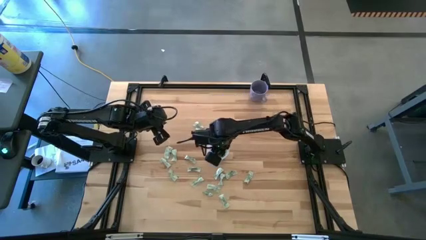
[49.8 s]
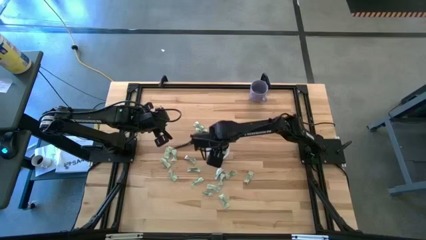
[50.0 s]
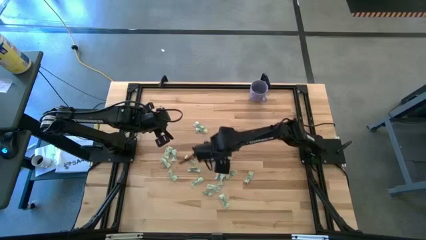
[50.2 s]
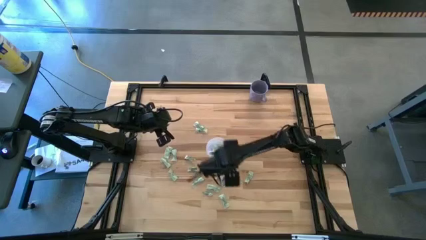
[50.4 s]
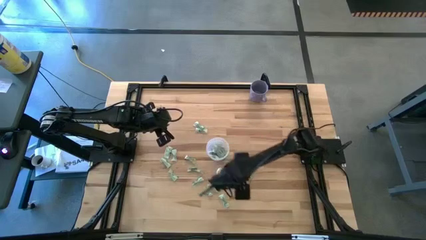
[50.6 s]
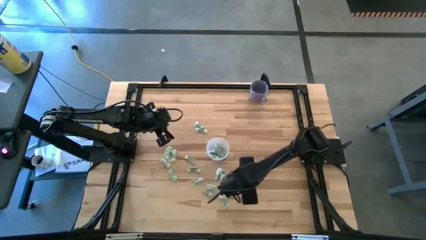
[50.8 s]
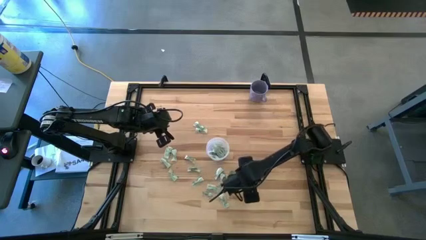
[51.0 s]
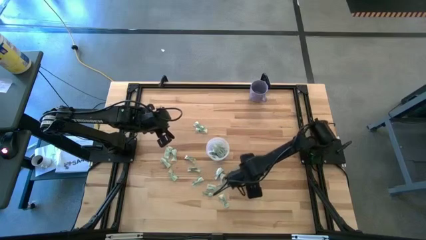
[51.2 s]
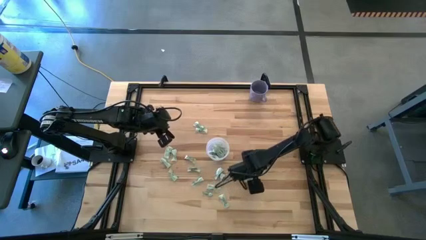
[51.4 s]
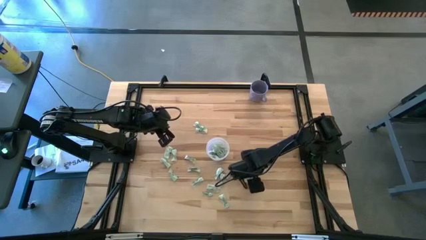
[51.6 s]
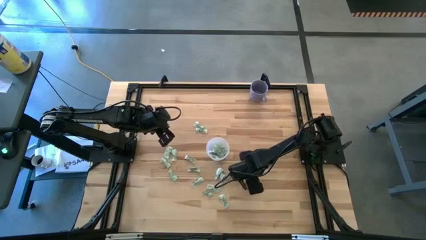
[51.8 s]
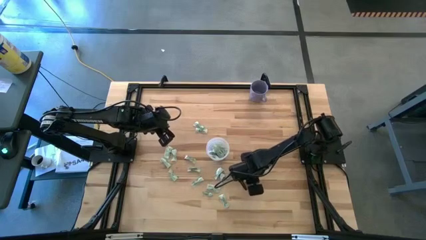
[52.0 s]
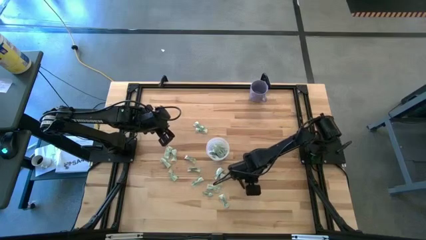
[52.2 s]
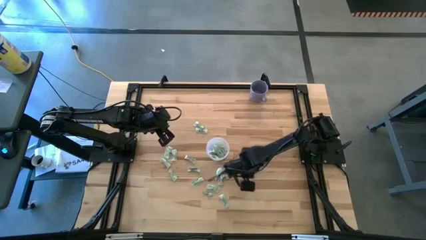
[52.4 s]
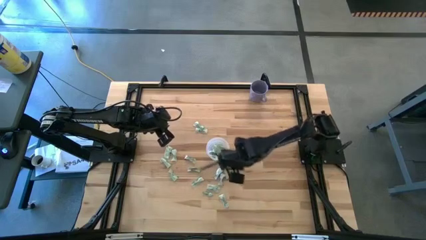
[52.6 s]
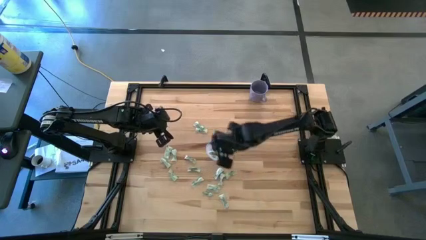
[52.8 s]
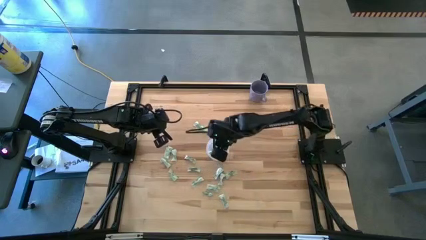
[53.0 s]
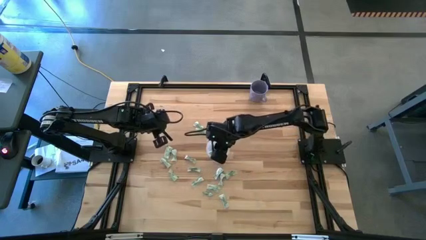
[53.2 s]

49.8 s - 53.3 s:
Task: Pick and place Stevia / Truvia into bins
Put the green stevia packet into the transparent container

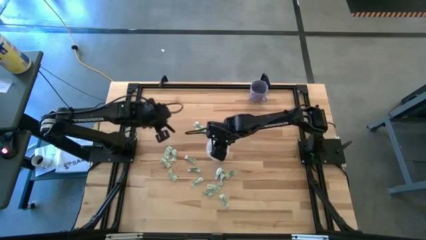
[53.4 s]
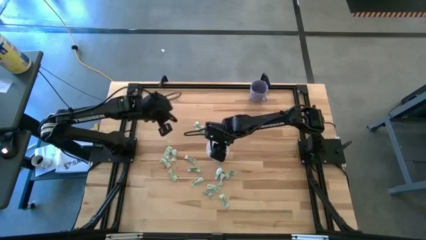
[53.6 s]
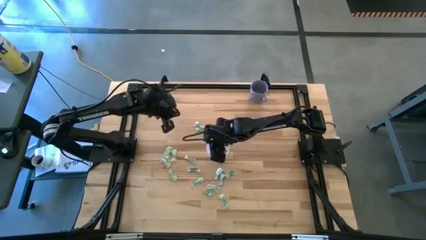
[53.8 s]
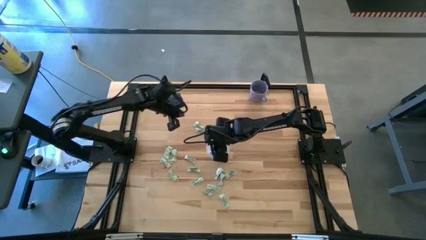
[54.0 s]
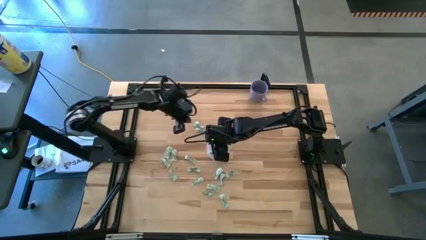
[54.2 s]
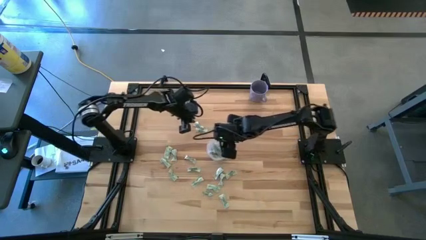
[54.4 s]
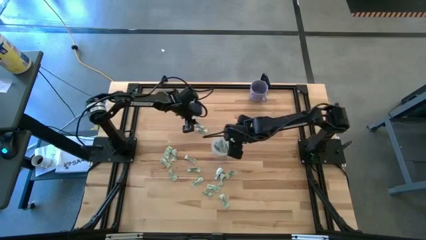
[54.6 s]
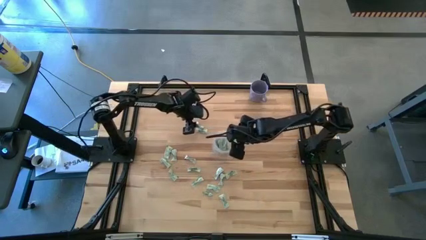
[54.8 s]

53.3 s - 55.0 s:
Adjust the transparent container on the table

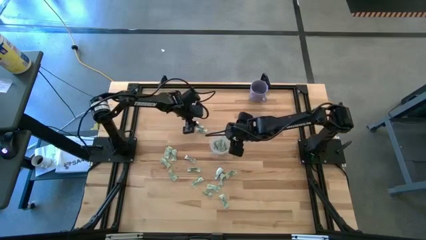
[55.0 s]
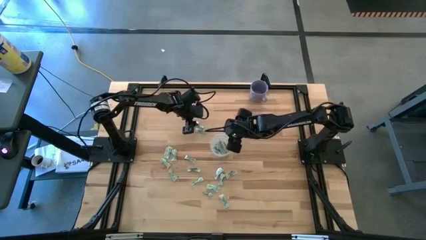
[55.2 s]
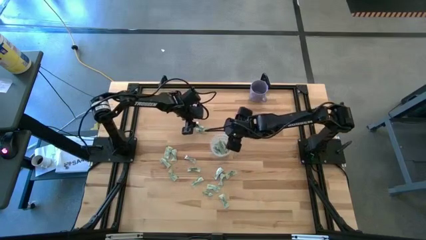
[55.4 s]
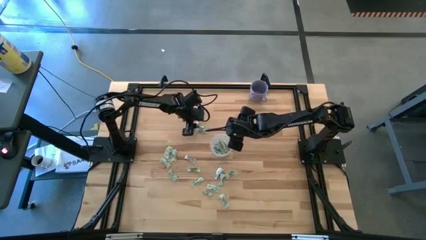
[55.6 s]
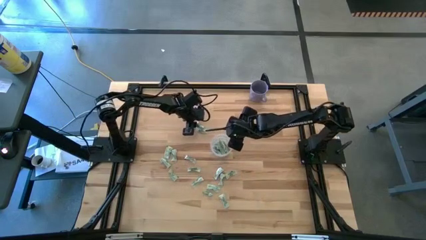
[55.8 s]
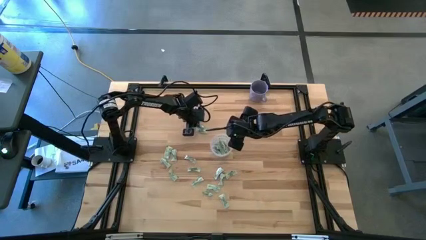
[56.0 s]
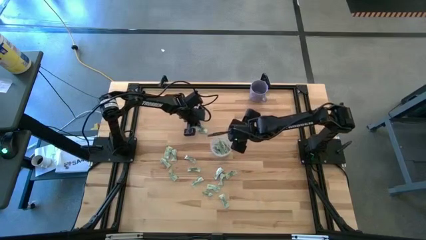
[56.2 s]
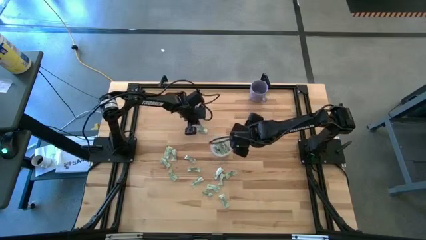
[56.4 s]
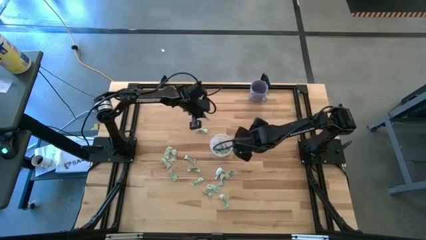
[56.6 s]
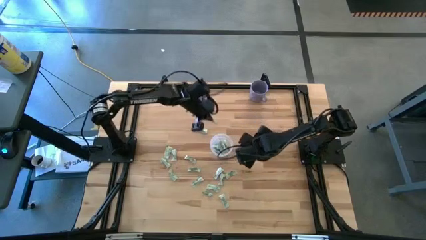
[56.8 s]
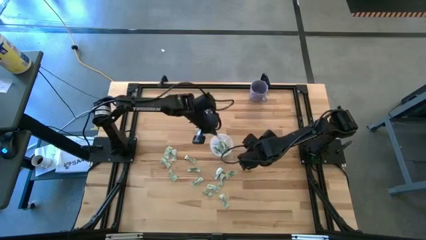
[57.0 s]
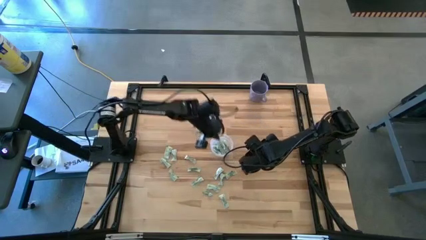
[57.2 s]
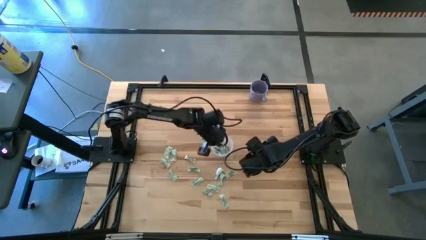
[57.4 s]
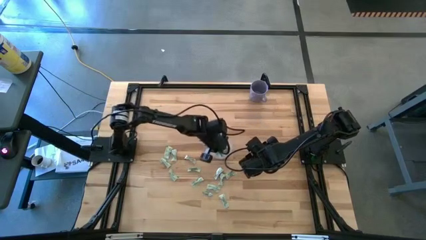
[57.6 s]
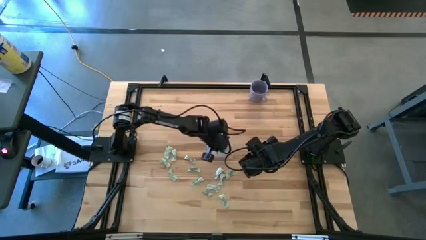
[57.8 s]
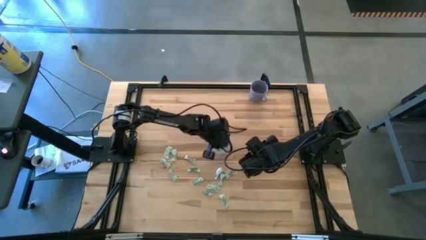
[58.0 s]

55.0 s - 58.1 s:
Put the green stevia packet into the transparent container

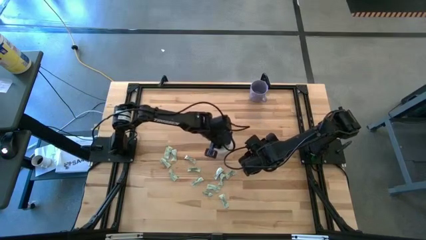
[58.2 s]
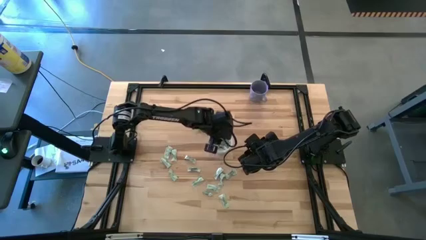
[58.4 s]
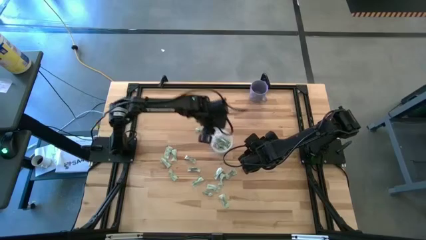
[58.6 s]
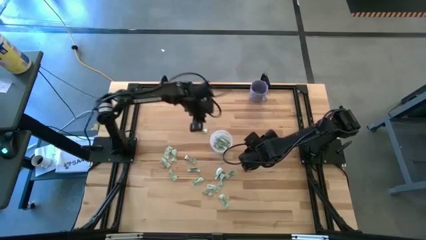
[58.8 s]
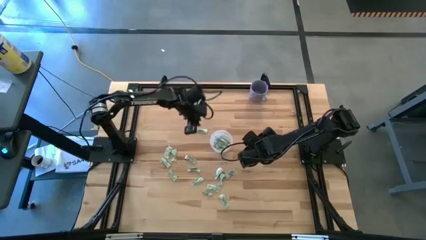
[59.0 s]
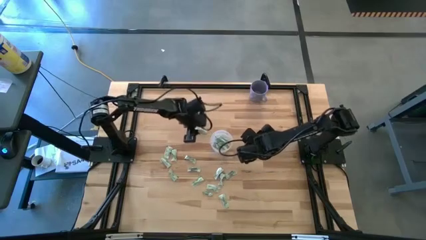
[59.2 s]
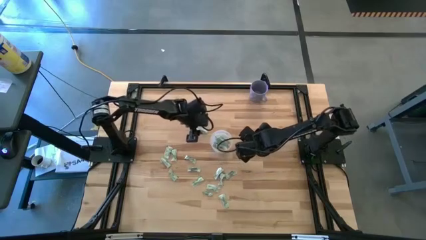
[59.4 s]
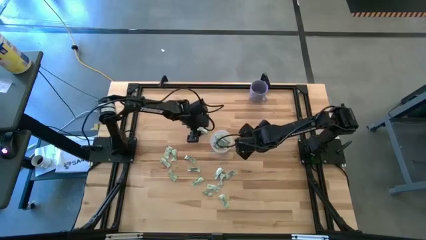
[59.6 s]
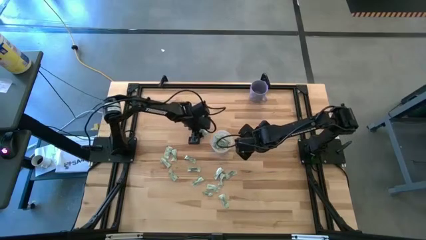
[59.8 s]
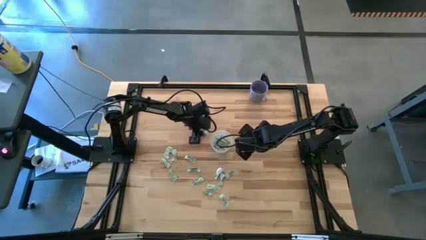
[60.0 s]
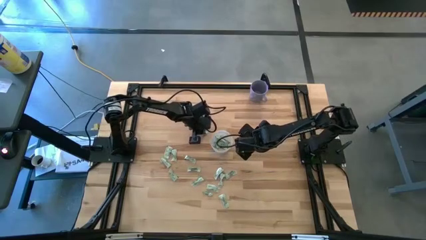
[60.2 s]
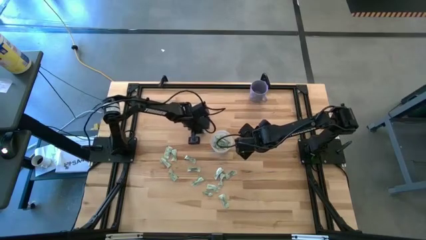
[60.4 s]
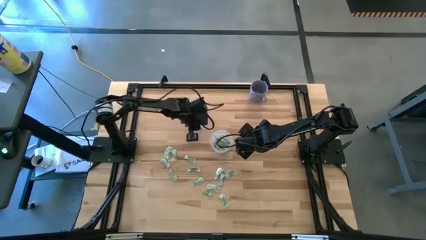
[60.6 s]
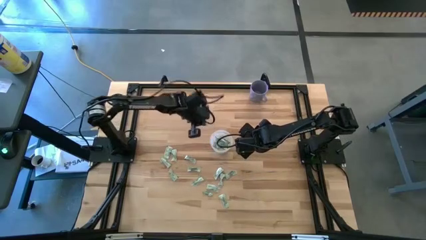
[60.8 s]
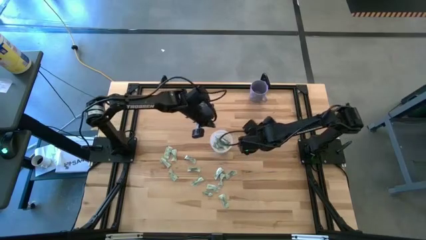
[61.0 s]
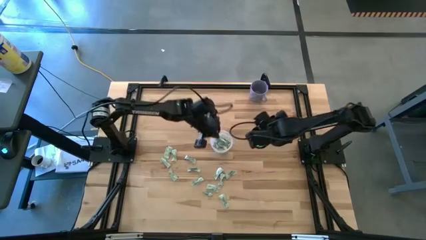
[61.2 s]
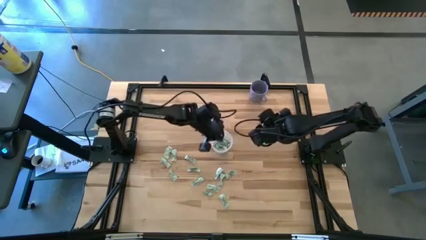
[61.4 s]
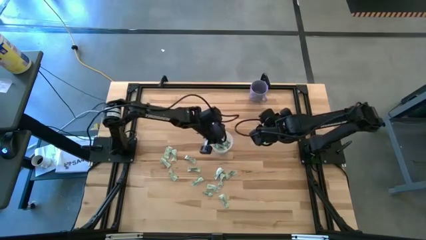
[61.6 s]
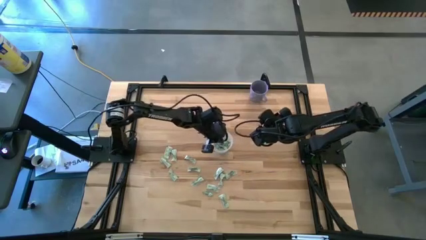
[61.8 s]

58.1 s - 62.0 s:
Put the green stevia packet into the transparent container

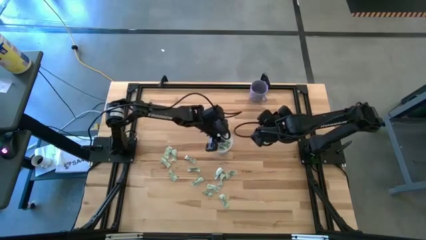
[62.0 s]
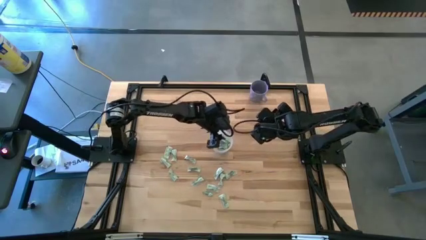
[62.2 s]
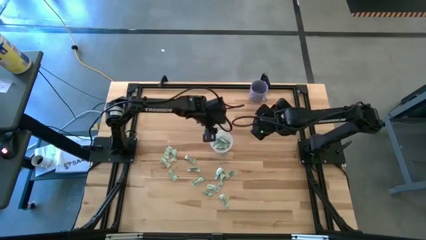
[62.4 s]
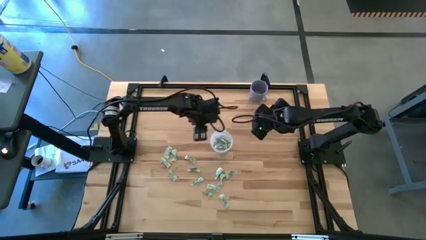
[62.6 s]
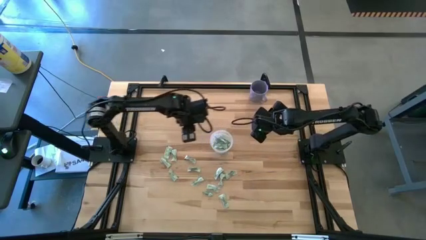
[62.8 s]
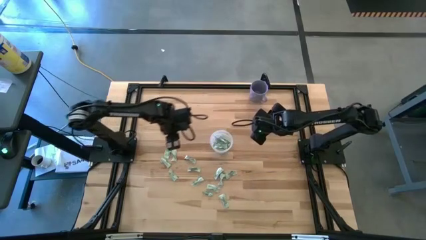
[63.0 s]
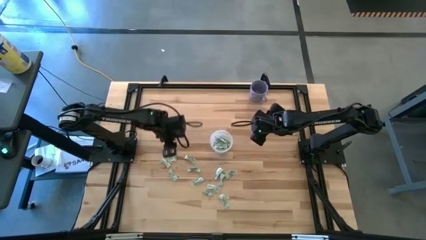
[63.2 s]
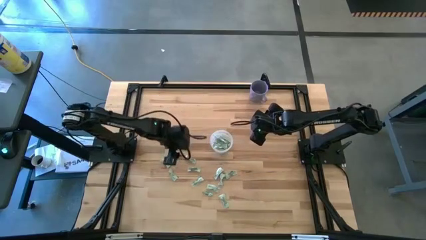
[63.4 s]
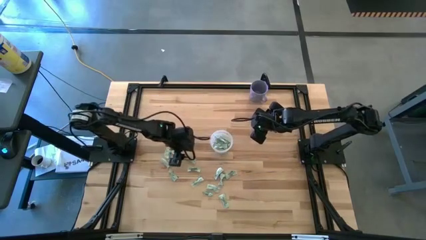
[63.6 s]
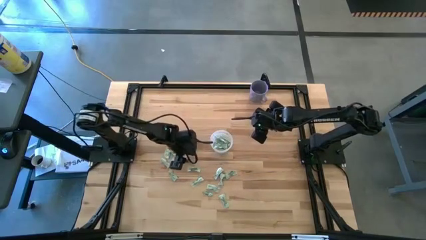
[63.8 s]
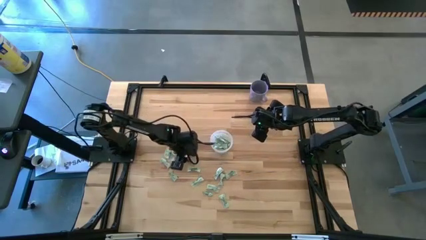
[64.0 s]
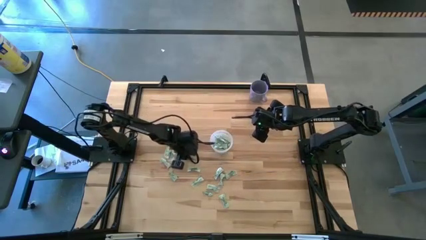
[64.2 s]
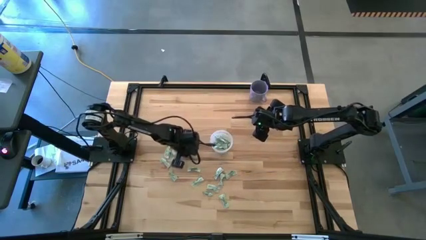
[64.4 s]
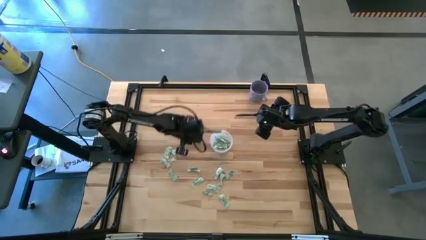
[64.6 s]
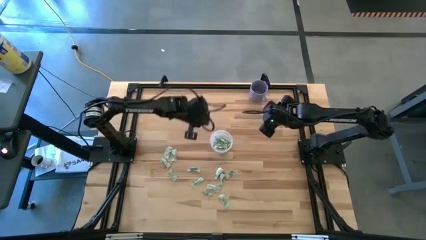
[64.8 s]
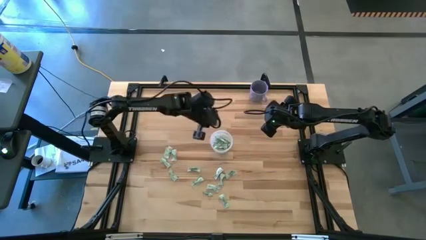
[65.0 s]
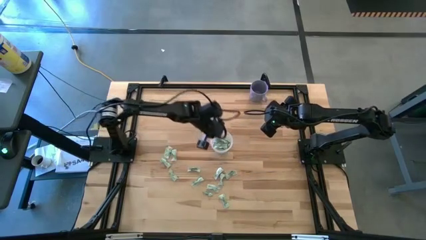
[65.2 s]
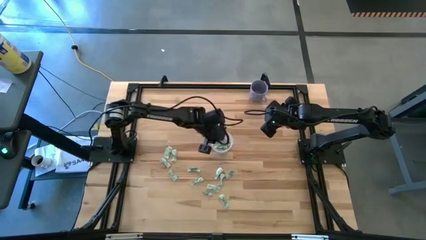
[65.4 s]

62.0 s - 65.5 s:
Put the green stevia packet into the transparent container

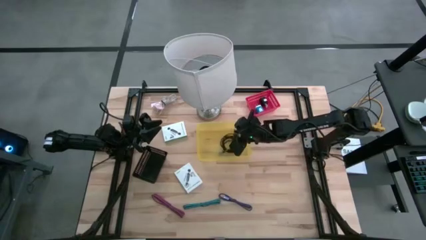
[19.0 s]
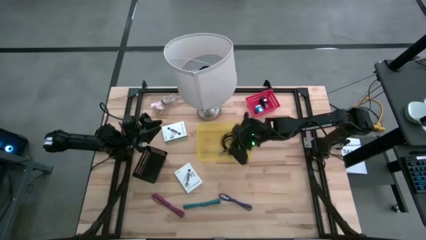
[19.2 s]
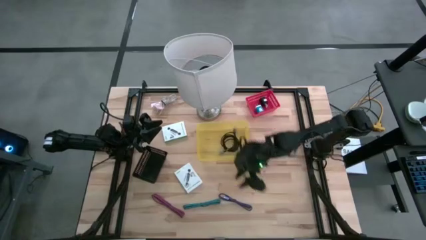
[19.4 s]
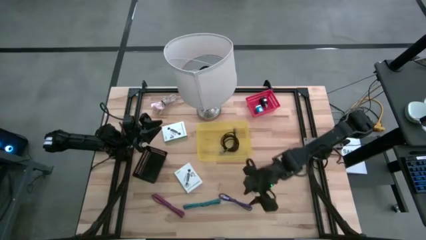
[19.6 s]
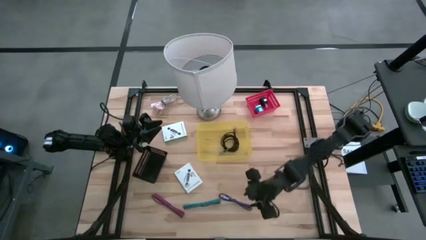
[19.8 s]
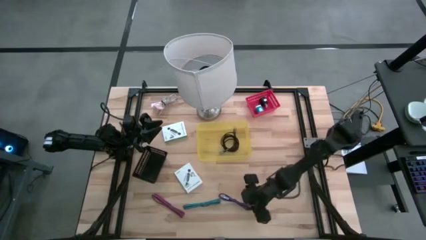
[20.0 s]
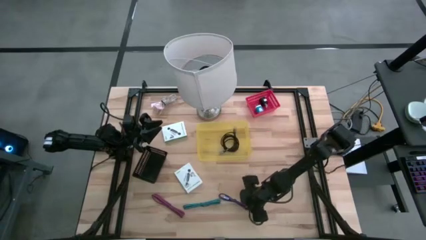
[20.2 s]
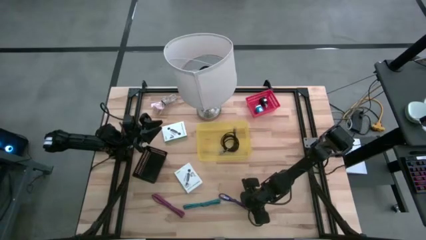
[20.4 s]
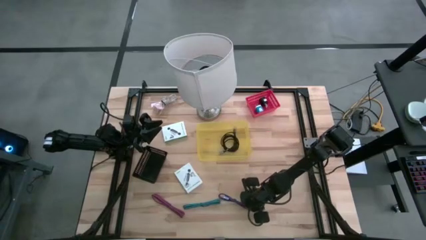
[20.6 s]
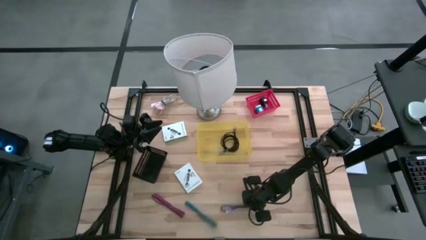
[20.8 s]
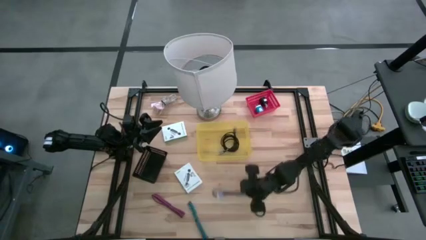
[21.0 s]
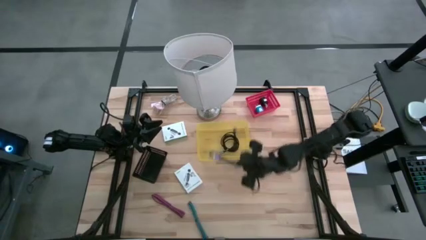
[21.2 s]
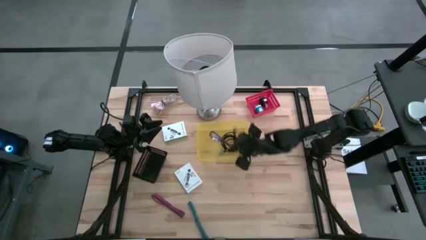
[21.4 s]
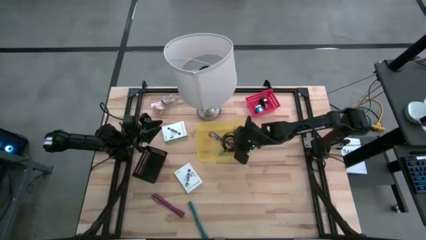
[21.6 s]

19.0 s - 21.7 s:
Task: Pick and place items into bin
Put the purple USB cable into the yellow bin
